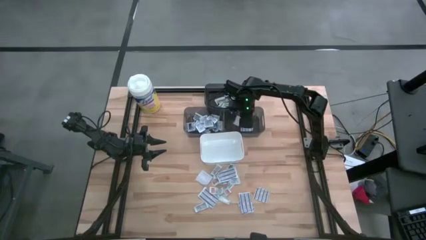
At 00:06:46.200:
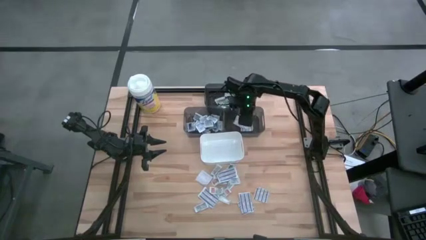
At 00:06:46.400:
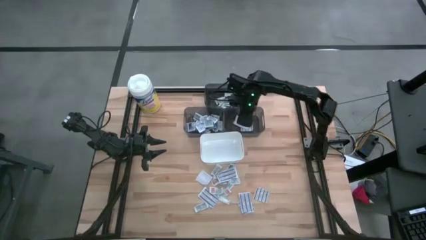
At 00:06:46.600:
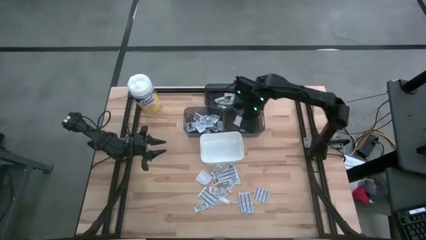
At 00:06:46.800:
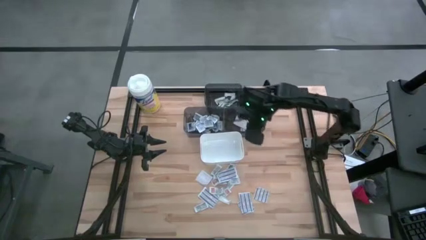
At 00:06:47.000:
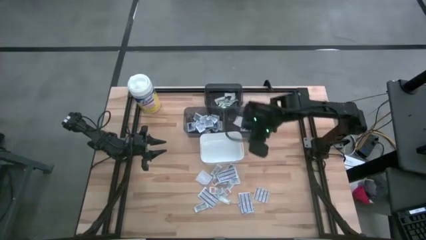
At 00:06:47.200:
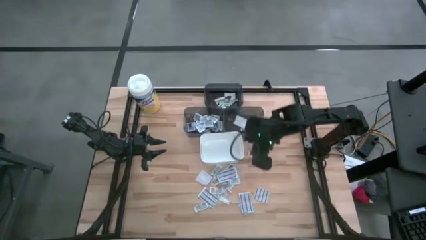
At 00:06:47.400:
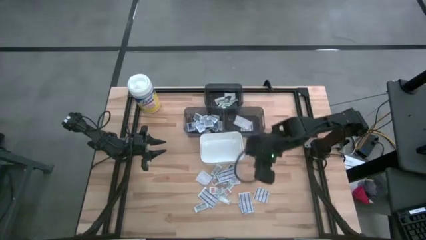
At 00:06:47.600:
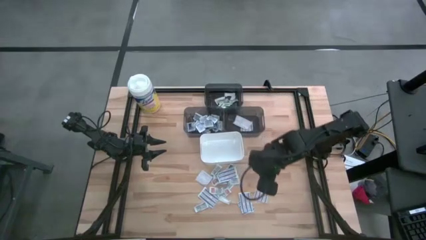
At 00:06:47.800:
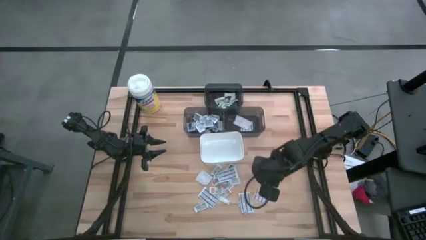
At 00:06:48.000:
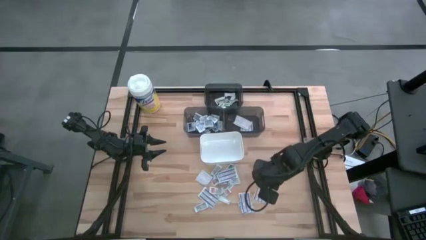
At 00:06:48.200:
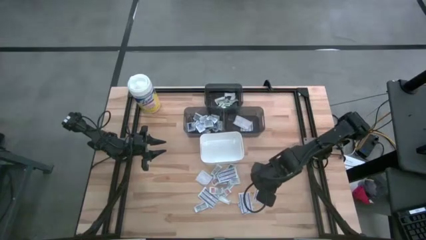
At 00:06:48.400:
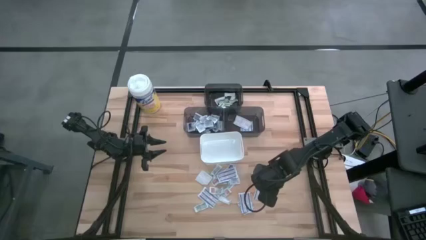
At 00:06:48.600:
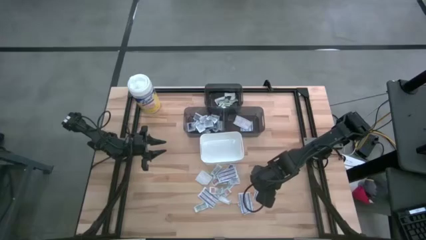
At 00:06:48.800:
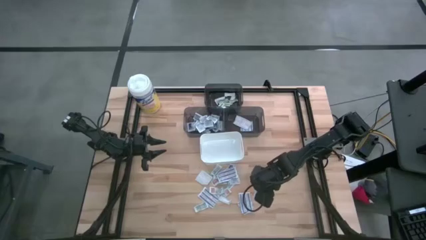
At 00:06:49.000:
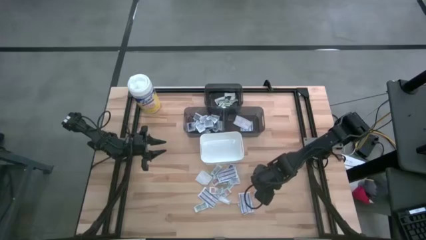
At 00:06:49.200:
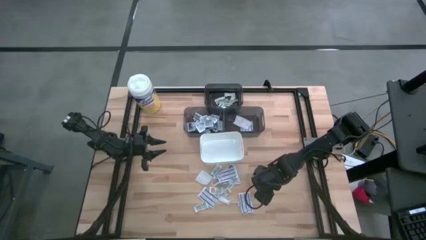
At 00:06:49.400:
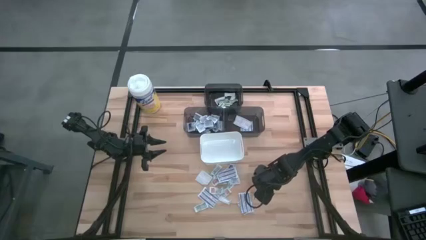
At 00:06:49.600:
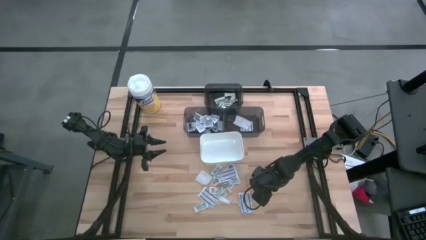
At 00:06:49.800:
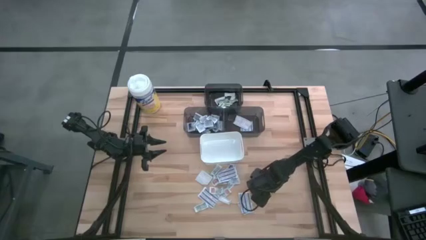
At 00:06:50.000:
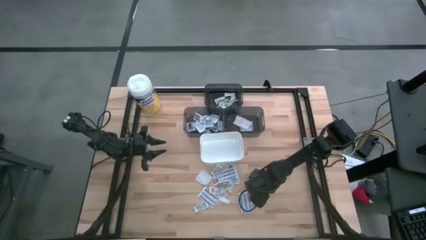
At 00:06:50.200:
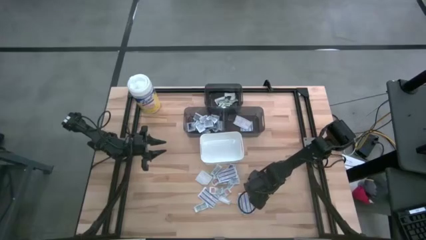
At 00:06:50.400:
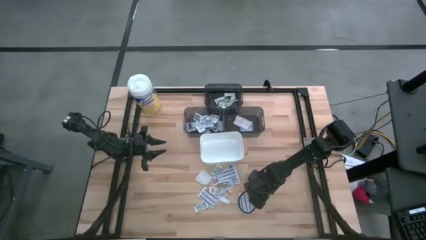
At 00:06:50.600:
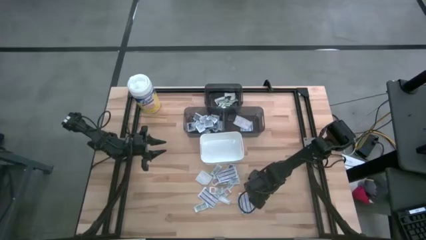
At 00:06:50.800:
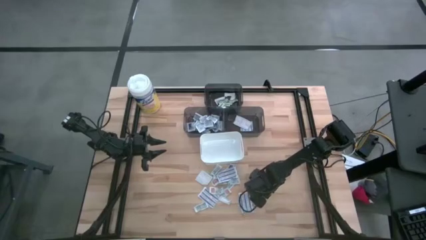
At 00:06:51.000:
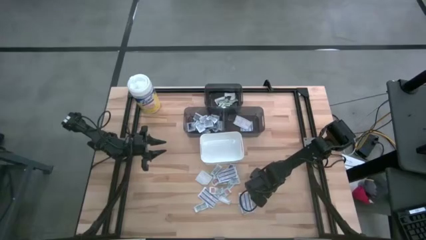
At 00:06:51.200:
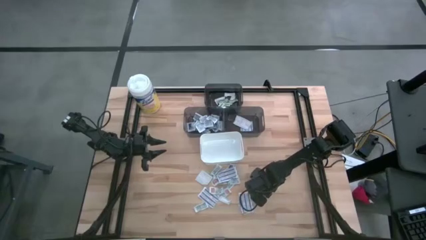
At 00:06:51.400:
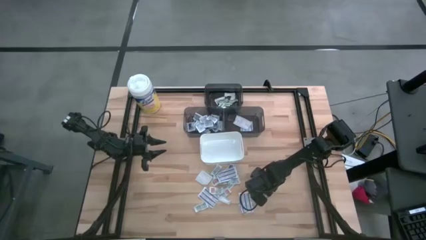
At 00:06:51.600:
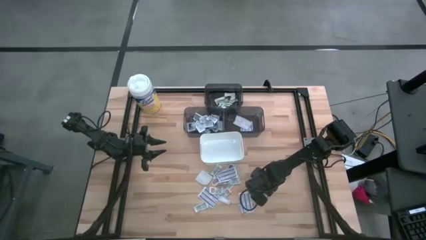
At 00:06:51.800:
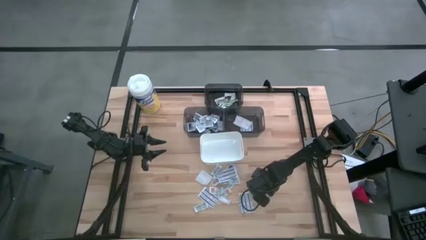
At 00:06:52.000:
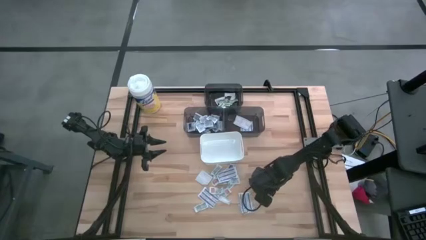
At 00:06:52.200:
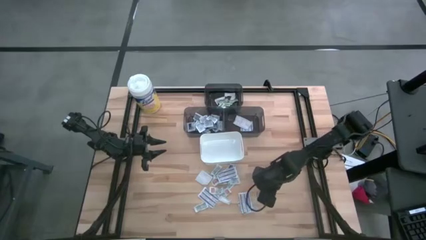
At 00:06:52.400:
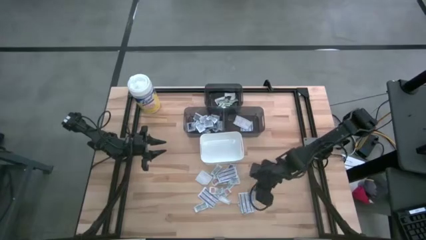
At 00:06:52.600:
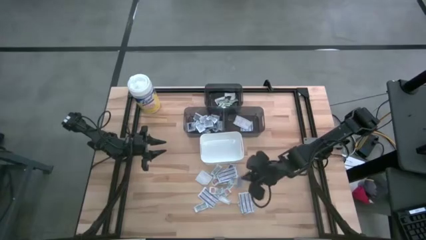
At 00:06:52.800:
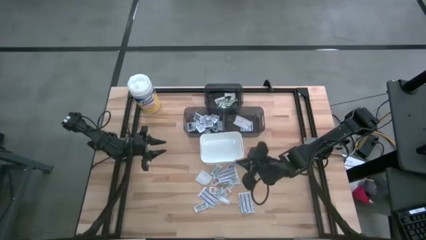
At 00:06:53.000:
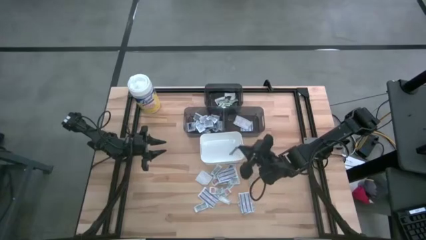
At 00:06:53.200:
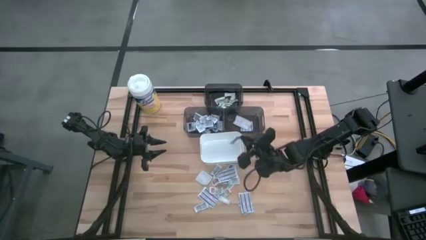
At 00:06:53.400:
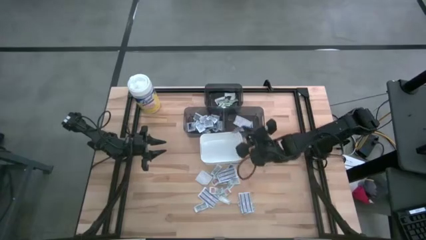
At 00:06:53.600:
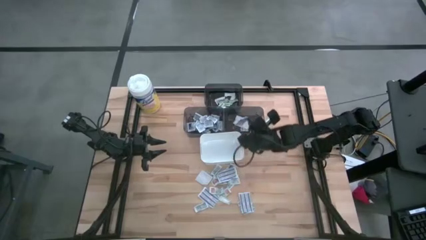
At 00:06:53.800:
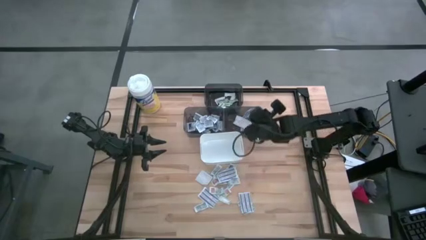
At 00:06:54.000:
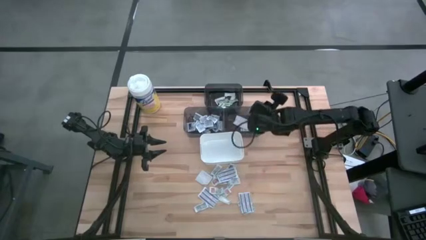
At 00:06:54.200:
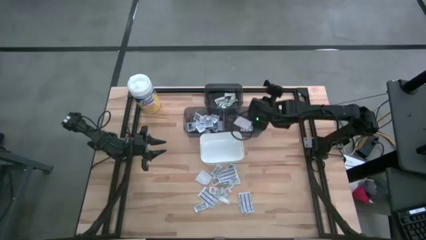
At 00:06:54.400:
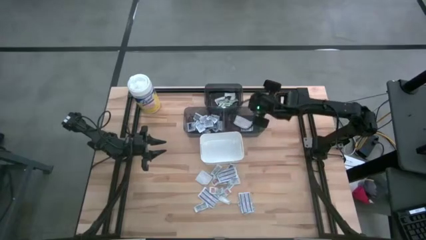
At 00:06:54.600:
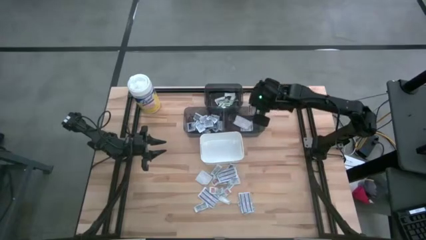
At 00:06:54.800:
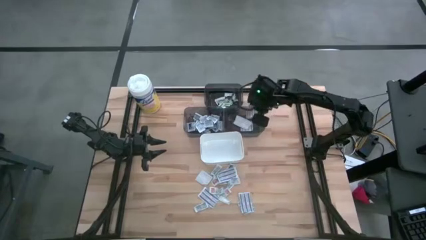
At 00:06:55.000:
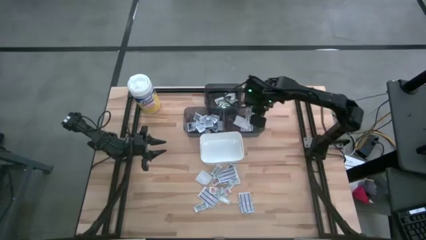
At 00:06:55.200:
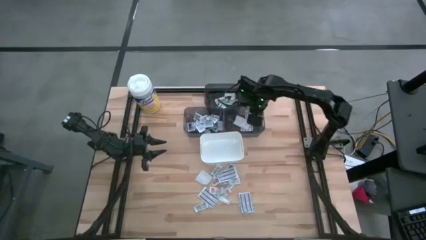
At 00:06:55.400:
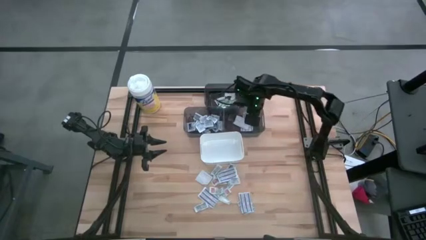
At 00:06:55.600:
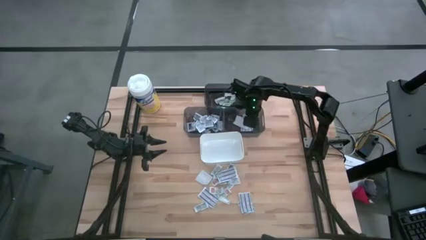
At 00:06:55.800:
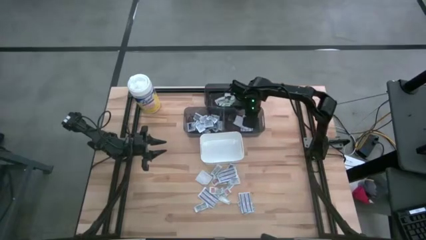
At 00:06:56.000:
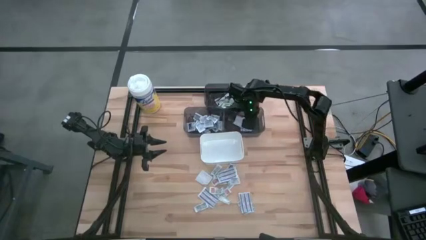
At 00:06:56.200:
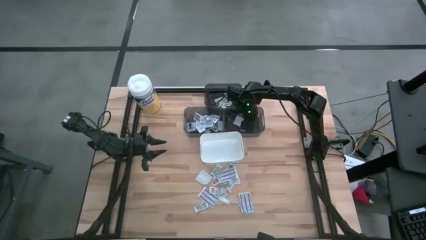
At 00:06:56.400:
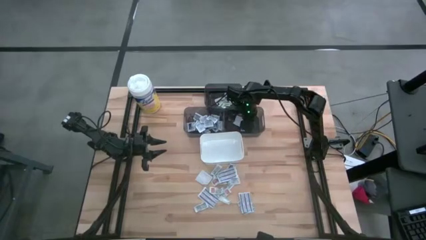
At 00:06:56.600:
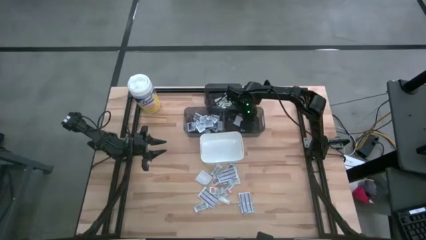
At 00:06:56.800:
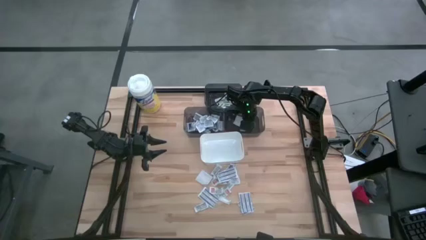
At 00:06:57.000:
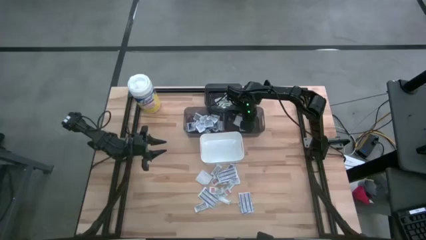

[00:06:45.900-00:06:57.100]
Task: Pick & Place First Aid Supplies
Put the blue bandage into the right black bin

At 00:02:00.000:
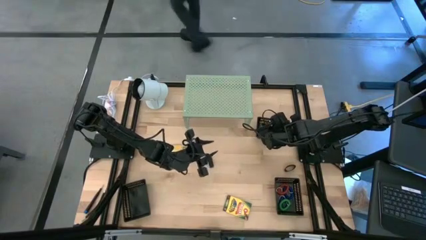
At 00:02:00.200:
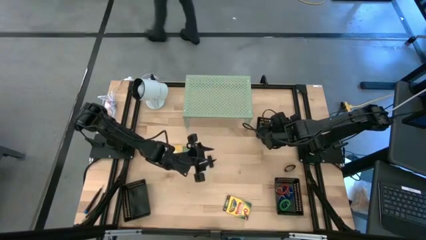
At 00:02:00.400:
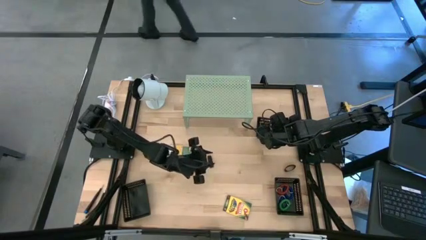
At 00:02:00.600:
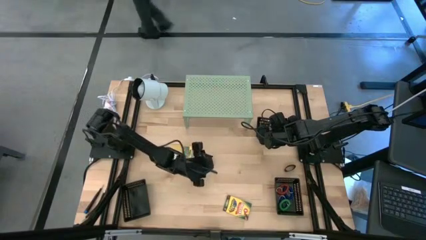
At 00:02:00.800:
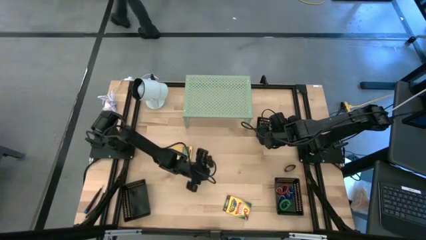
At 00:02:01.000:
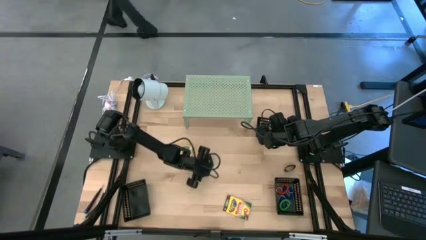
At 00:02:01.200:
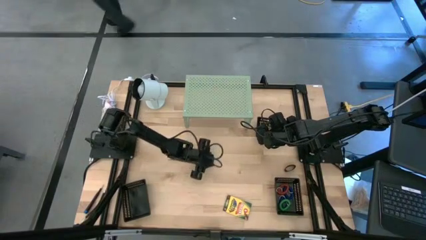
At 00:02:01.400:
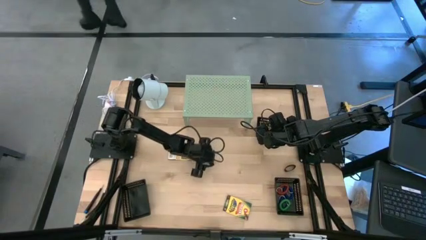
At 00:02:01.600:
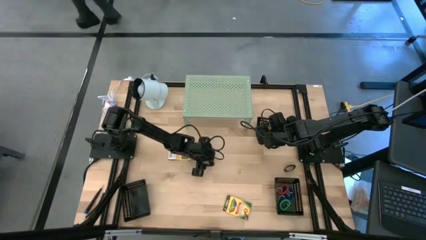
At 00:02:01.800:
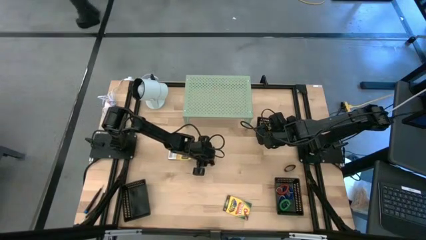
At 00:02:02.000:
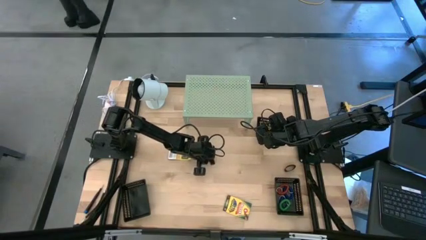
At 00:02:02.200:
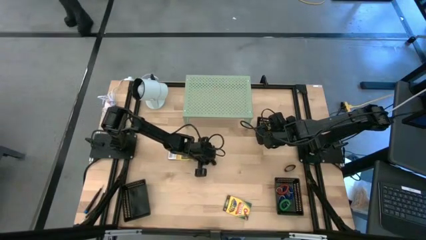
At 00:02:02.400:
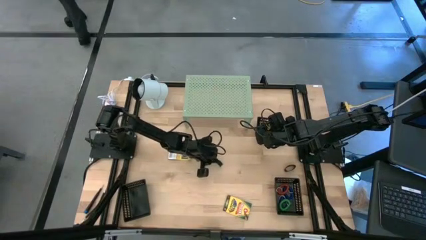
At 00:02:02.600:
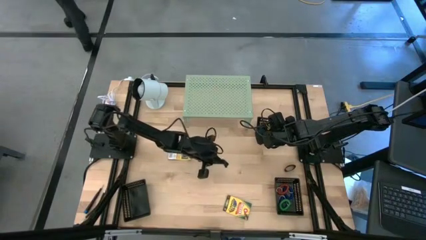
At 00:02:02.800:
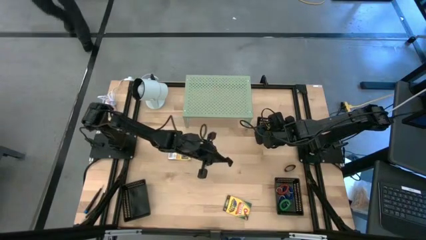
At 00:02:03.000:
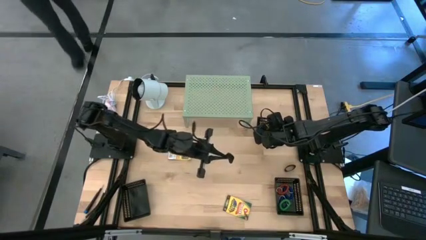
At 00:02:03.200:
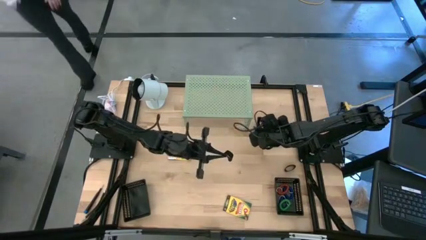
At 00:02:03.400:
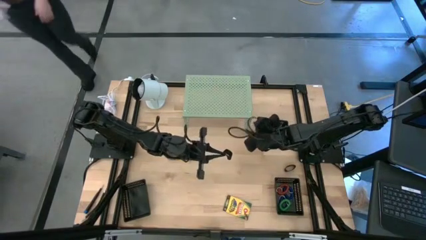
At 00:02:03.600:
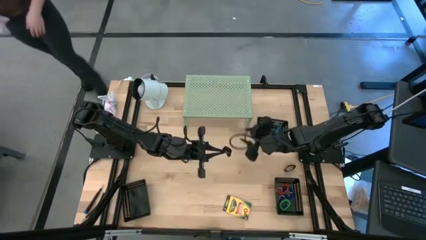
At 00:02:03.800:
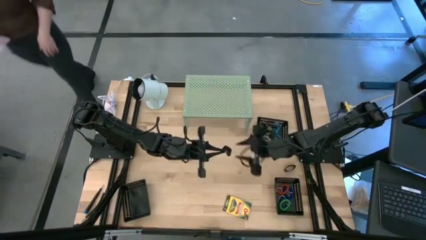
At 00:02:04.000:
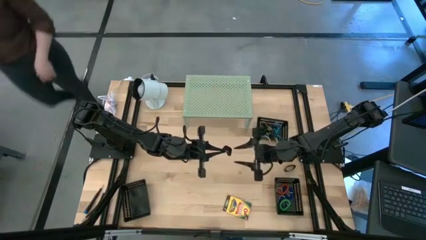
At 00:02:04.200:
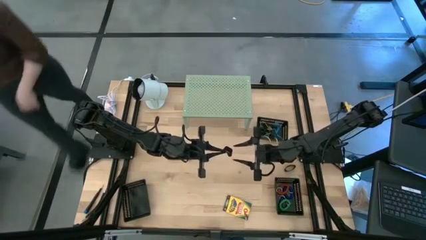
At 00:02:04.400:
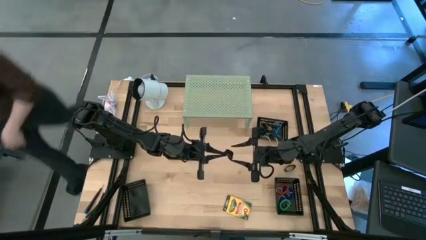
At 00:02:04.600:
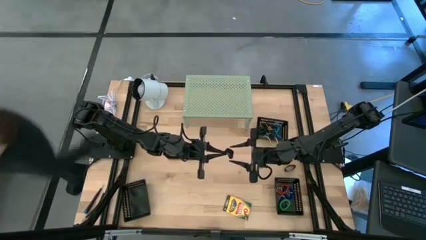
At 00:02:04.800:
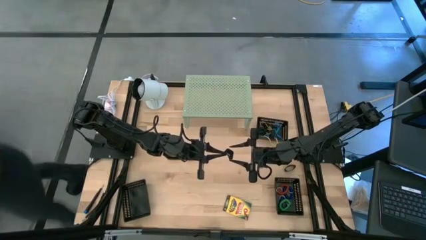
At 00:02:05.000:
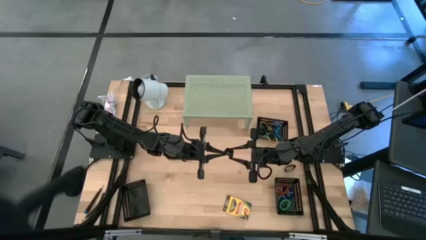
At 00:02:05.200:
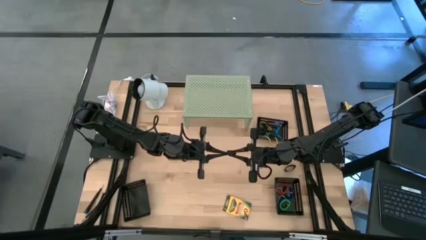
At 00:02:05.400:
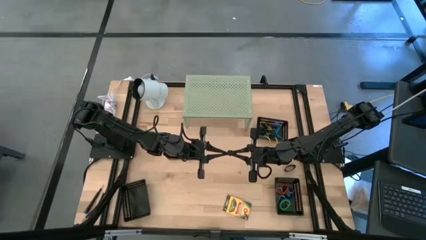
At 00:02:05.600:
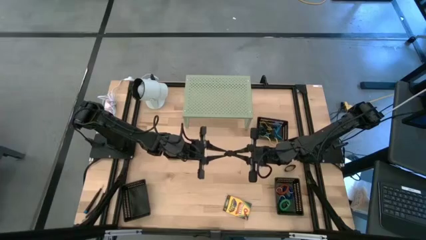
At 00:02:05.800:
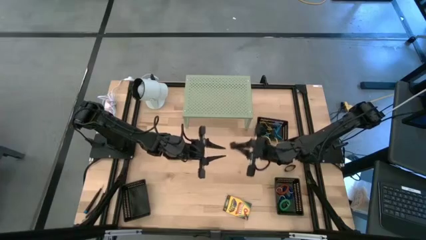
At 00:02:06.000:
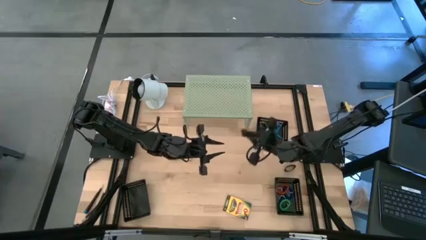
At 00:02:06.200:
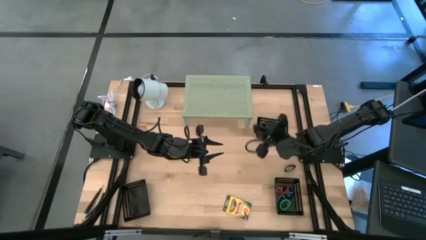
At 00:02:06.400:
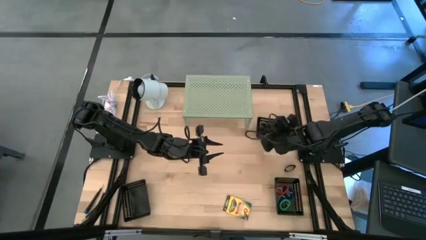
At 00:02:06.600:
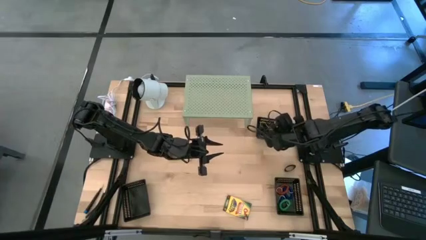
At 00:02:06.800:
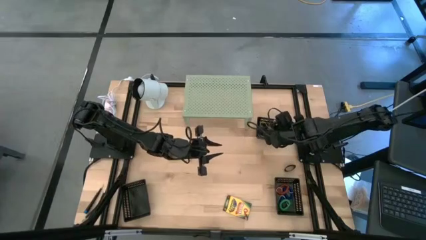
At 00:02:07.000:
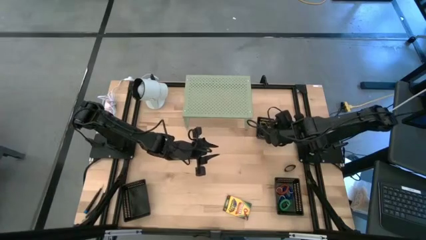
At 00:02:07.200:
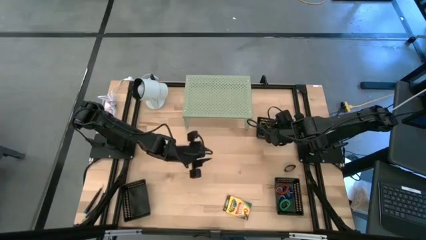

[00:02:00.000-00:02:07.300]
Task: Pick & Place Office Desk Supplies
Put the black rubber band into the top right black bin
